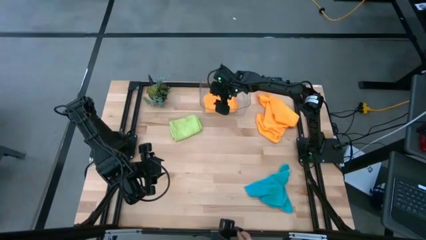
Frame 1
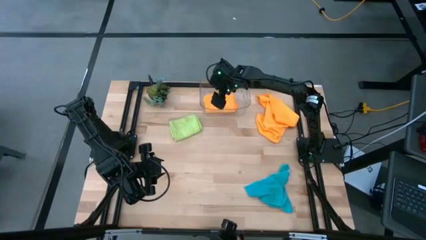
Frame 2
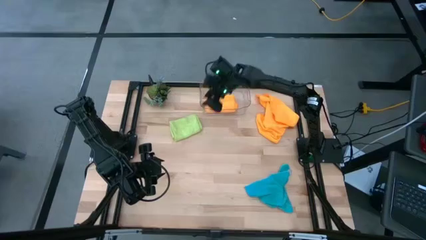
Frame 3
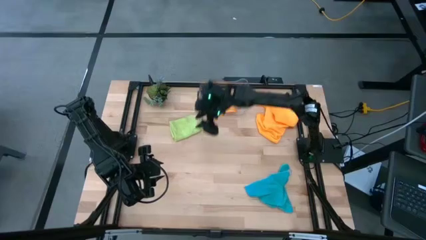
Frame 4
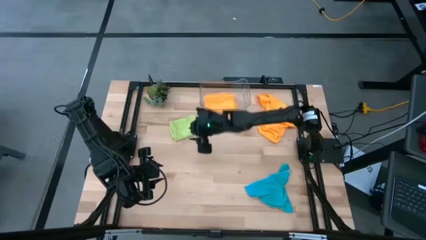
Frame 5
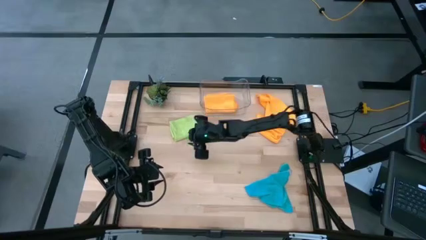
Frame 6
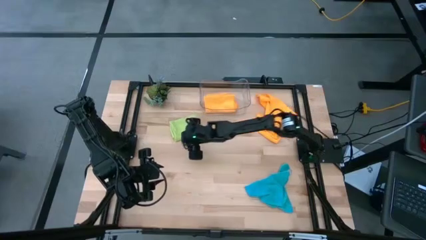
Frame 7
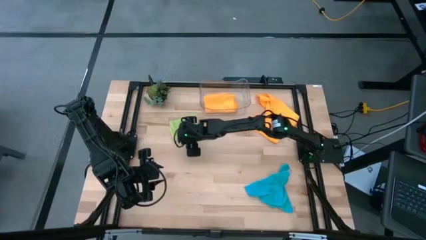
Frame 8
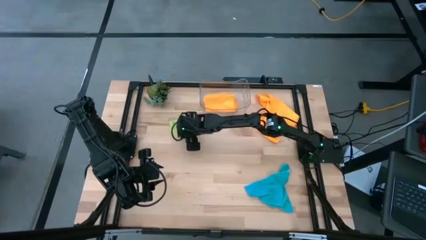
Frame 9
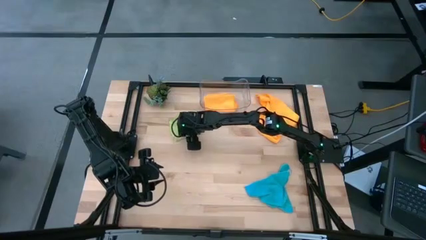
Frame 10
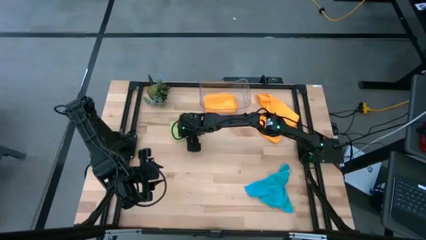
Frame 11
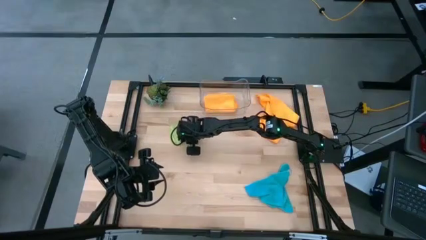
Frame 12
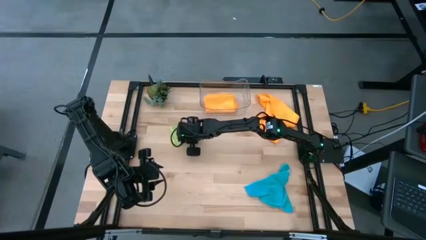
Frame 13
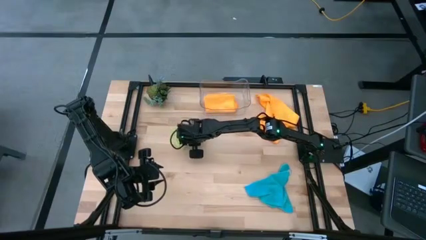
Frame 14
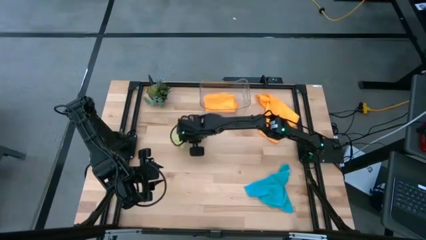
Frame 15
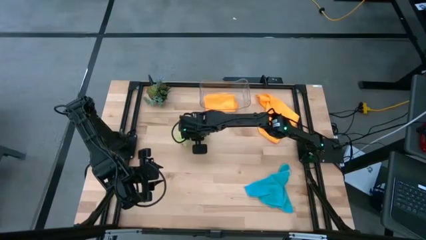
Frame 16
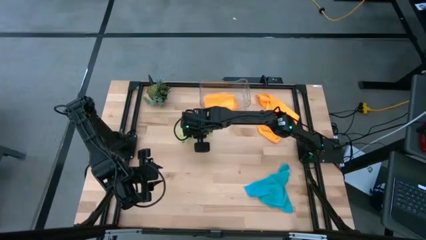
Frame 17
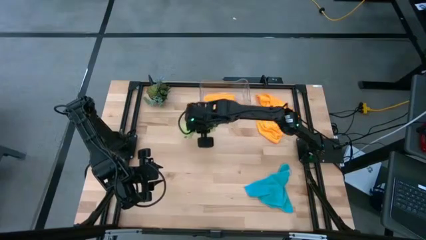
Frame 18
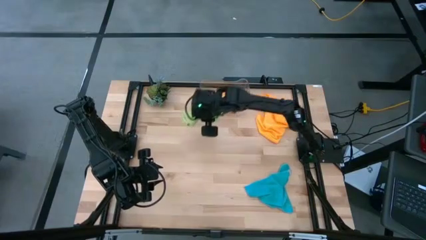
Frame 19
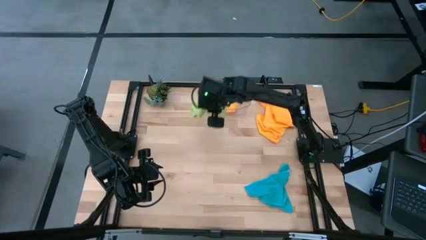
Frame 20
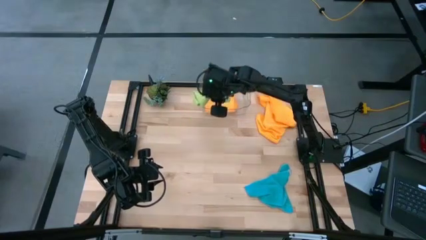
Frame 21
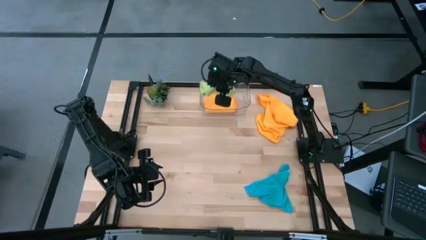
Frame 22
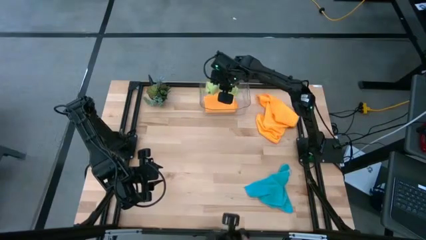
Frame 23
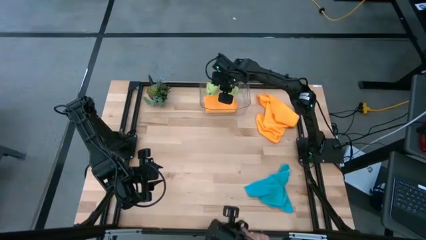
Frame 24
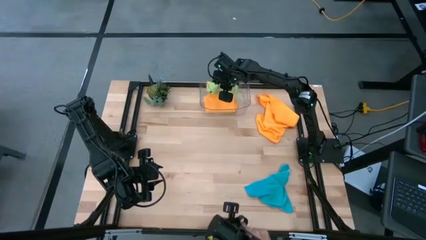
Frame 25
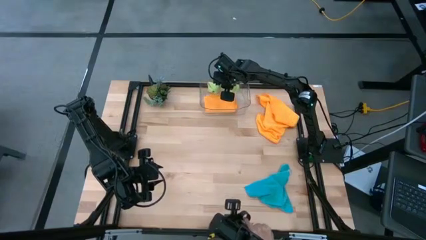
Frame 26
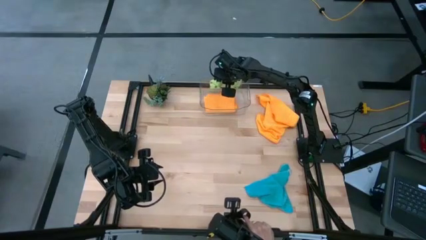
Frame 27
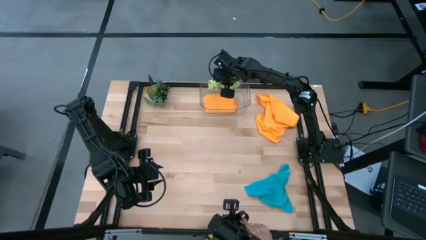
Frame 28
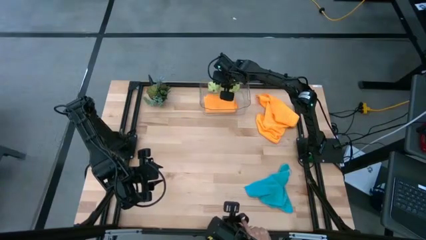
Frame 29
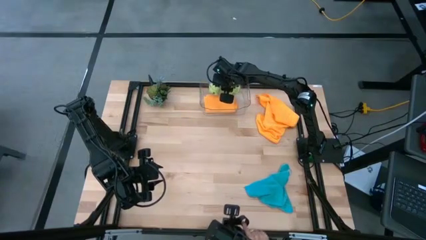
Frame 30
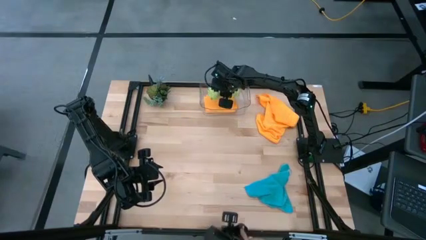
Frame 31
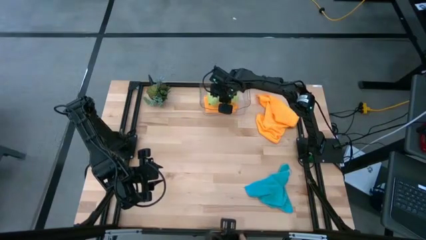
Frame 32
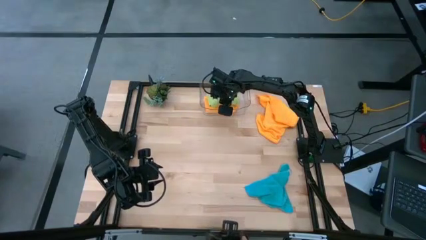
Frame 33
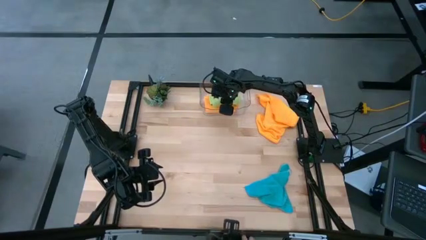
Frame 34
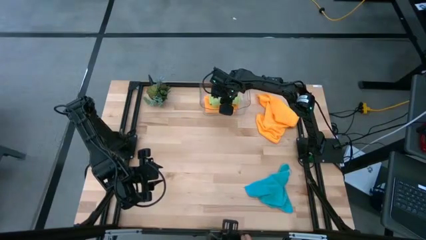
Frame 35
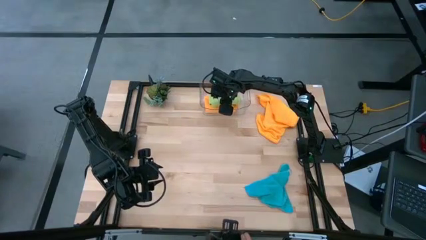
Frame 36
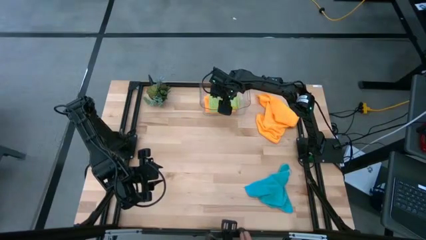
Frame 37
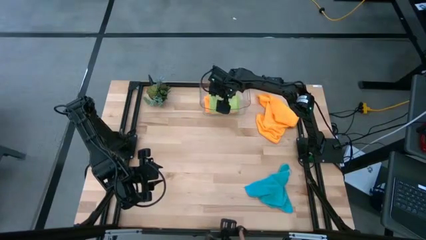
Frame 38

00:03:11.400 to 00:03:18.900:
Task: Fold microfiber towels
Put the green microfiber cloth into the transparent bin

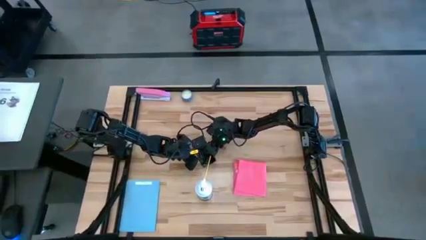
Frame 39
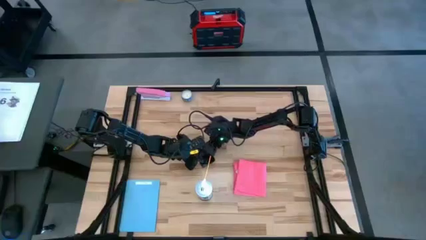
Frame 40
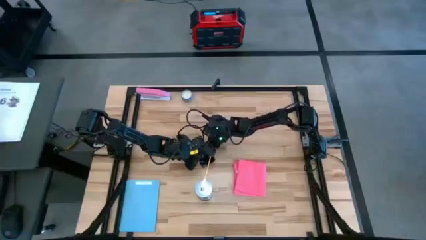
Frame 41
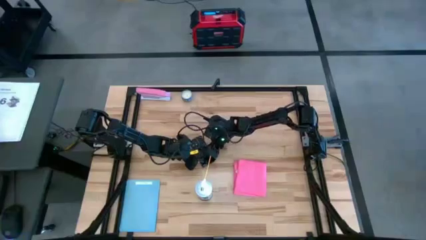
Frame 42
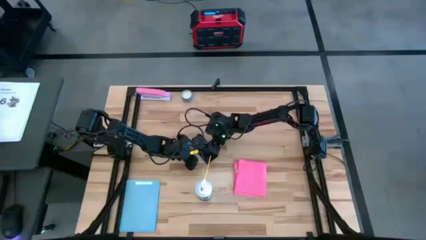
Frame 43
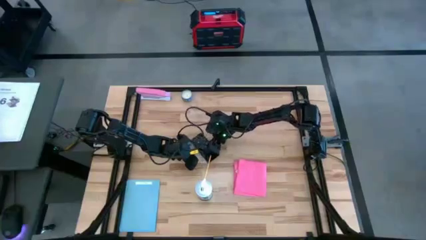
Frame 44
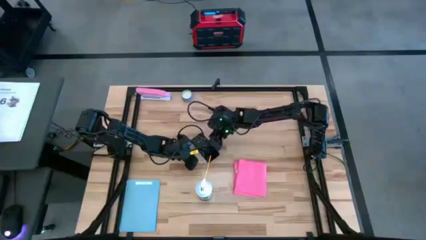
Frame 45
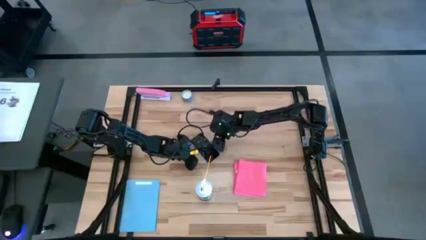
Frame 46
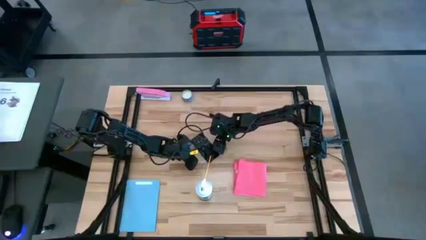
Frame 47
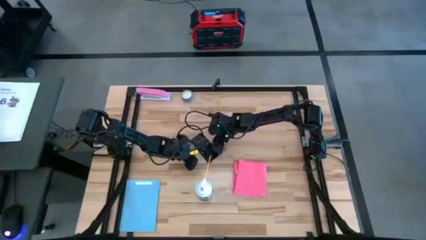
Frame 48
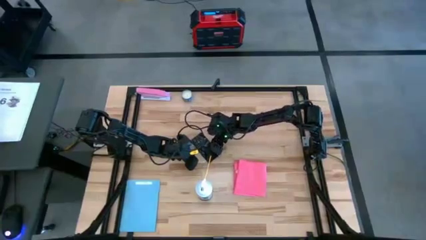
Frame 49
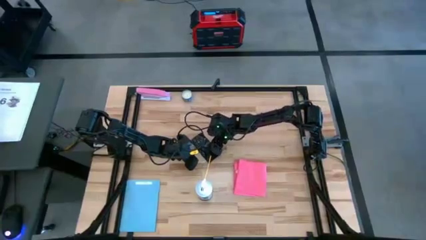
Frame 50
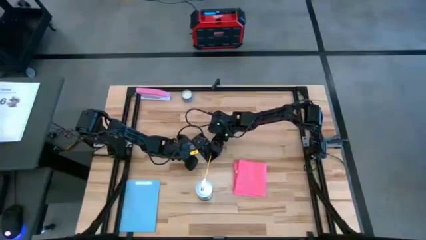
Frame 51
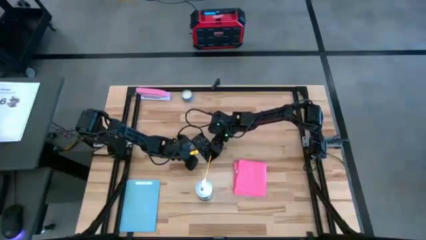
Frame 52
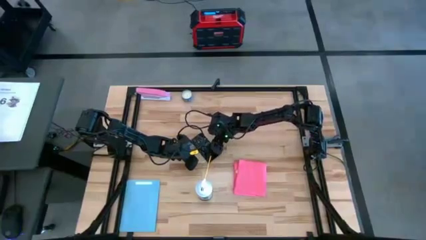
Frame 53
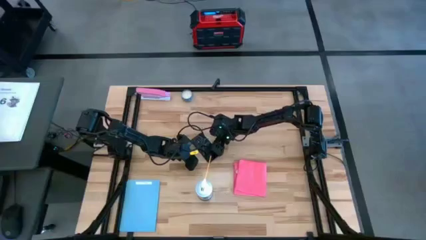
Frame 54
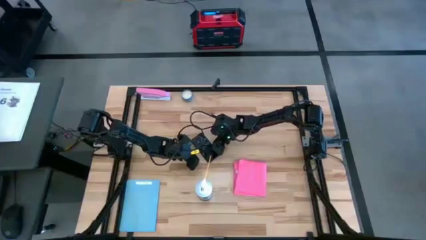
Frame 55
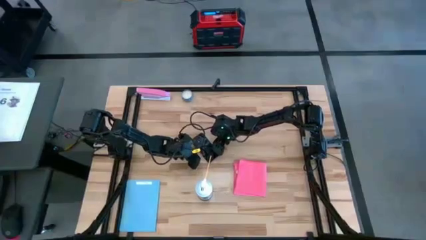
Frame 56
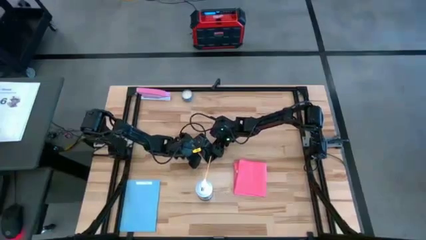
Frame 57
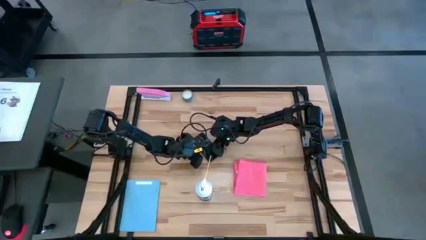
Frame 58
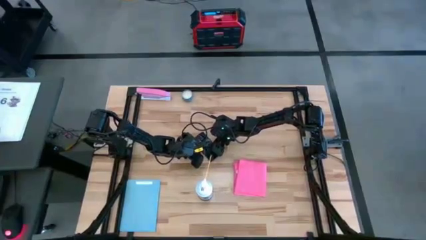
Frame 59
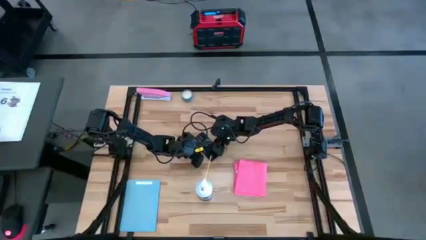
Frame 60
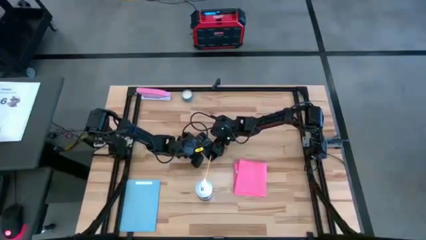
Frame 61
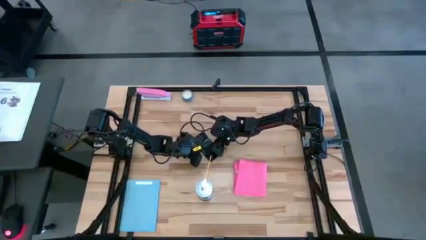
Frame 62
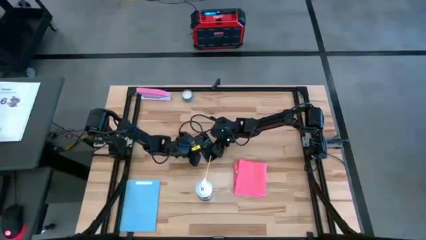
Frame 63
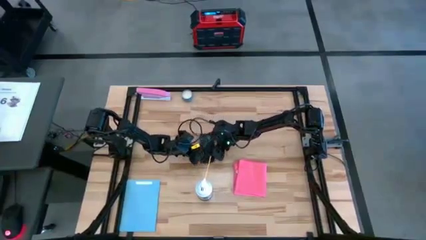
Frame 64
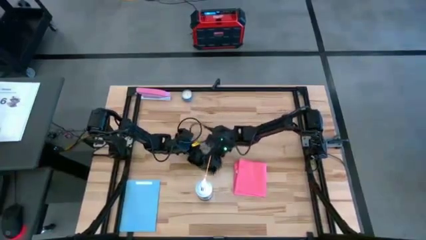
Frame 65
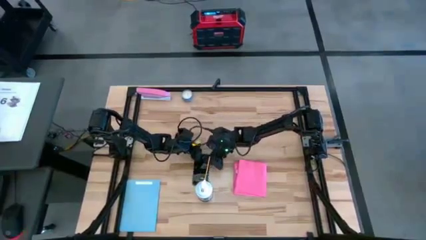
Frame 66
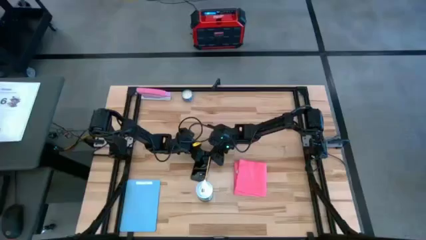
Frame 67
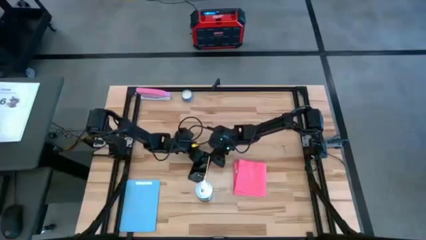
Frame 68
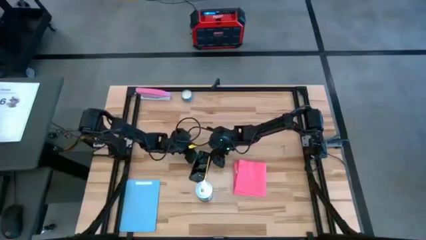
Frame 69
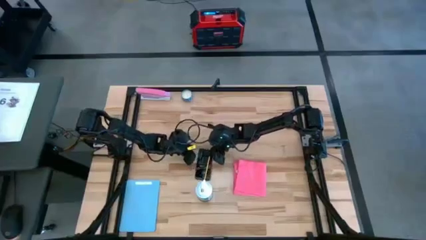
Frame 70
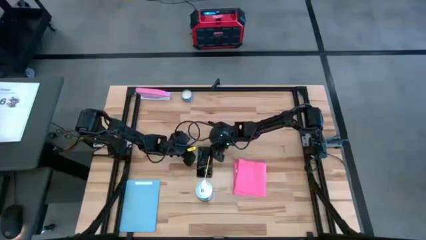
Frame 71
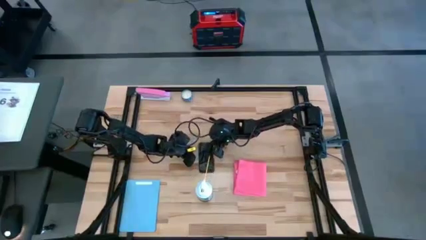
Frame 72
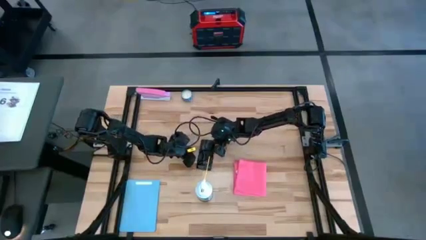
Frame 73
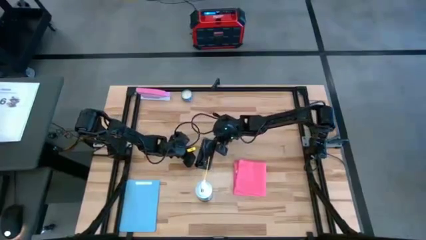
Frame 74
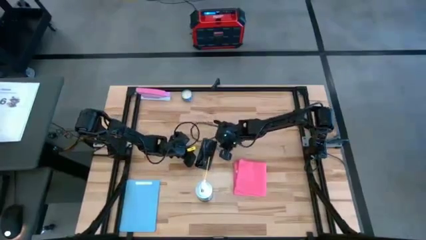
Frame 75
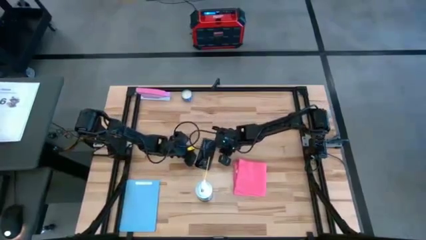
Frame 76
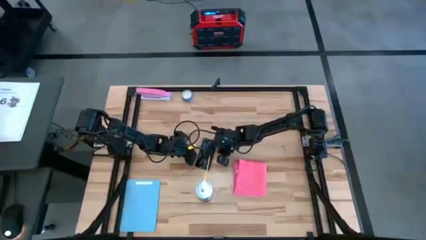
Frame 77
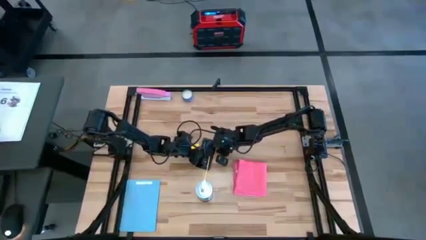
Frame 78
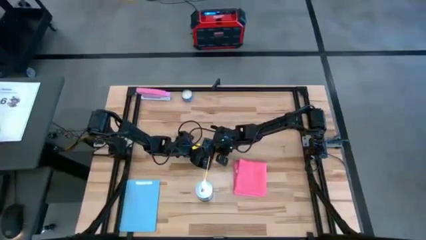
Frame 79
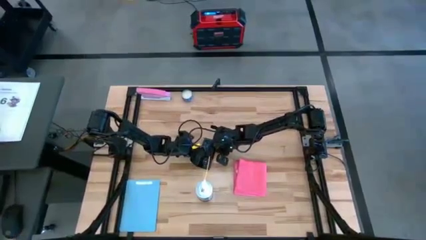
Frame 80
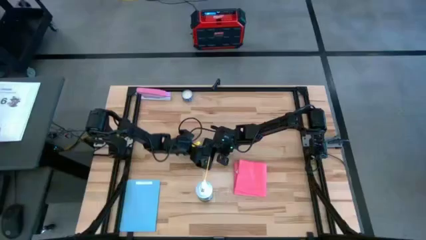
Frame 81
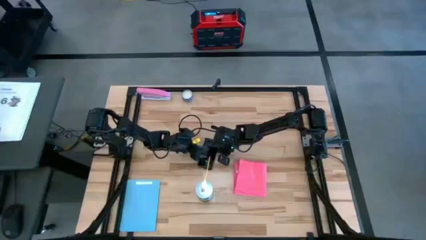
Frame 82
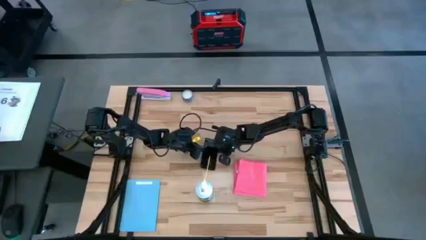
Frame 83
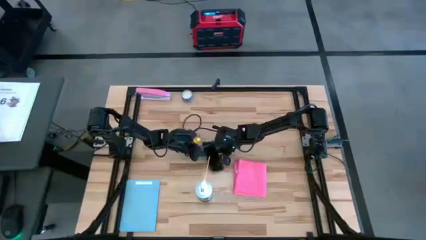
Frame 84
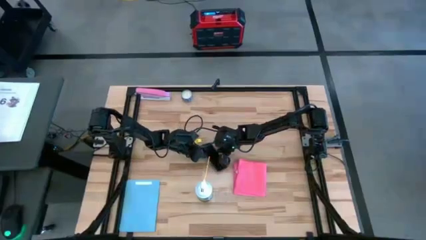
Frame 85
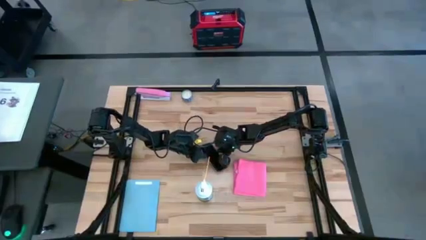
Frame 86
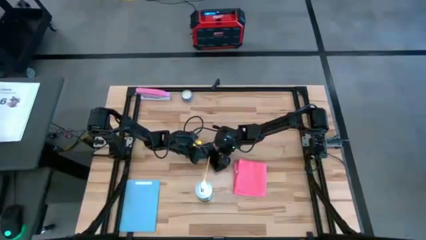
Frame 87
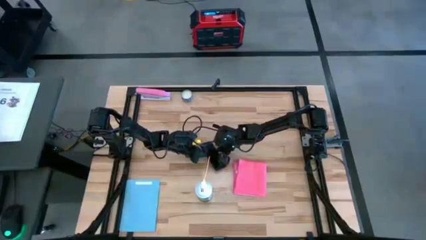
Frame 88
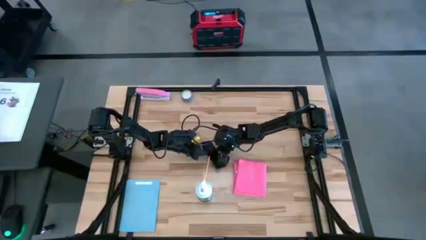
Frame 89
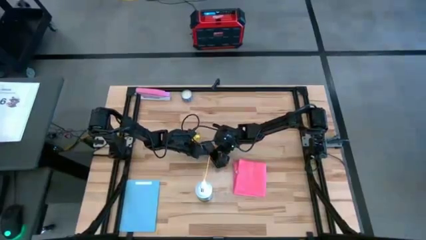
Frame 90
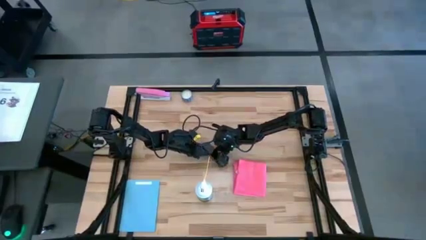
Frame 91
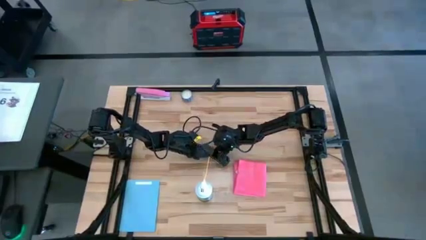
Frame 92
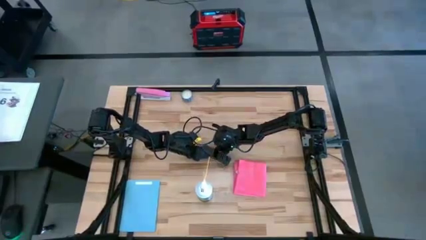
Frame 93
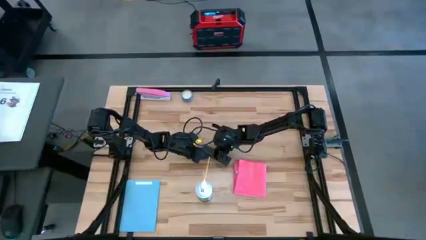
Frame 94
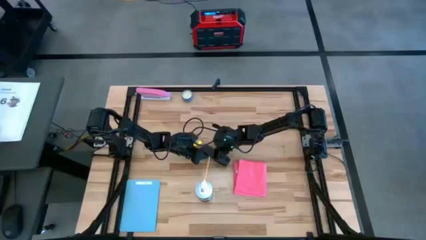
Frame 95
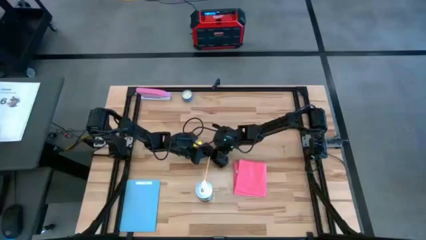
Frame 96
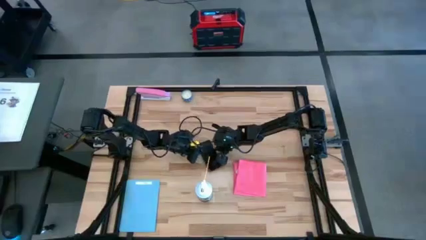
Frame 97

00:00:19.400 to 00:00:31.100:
Task: Apply microfiber cloth
Spray the back of the black cellphone using the spray bottle
